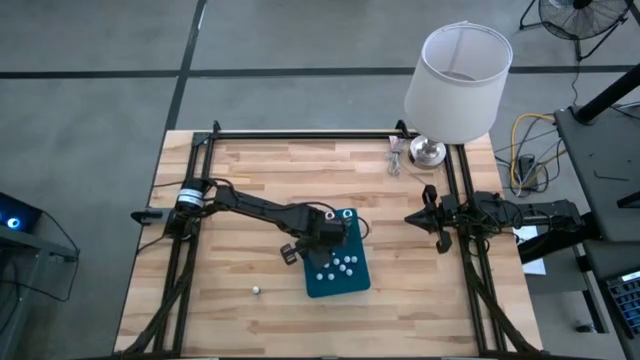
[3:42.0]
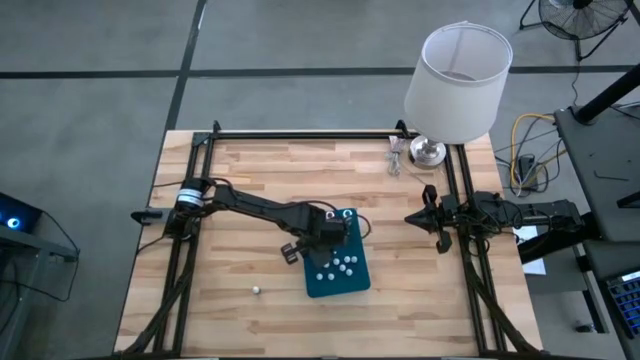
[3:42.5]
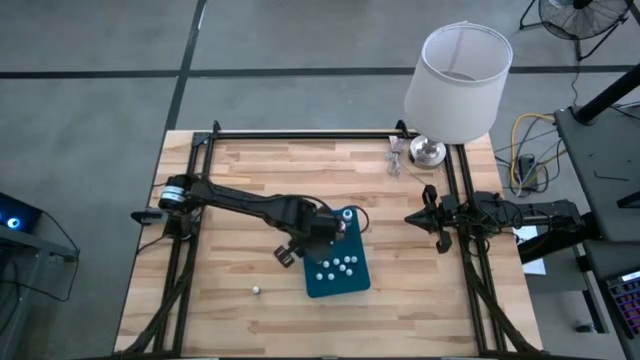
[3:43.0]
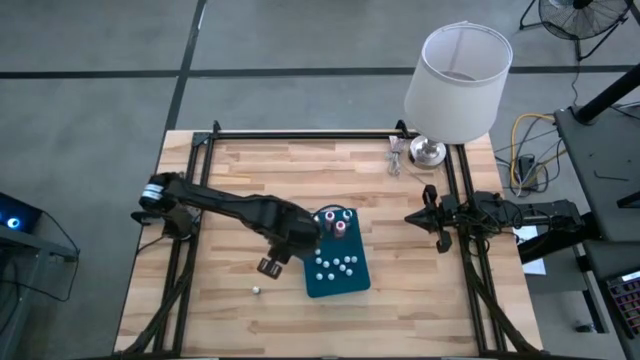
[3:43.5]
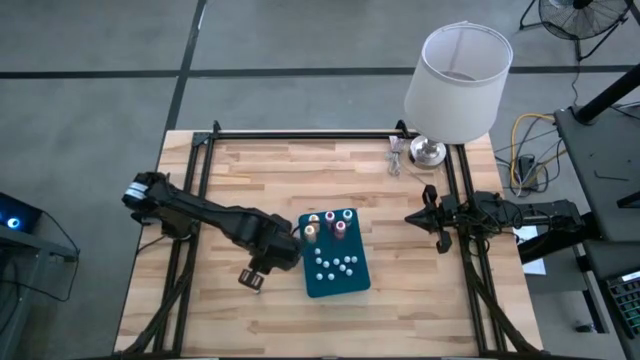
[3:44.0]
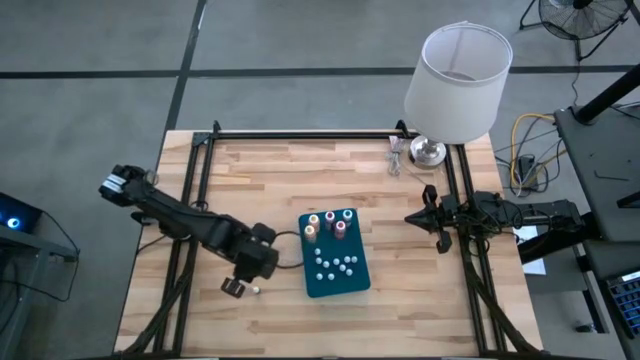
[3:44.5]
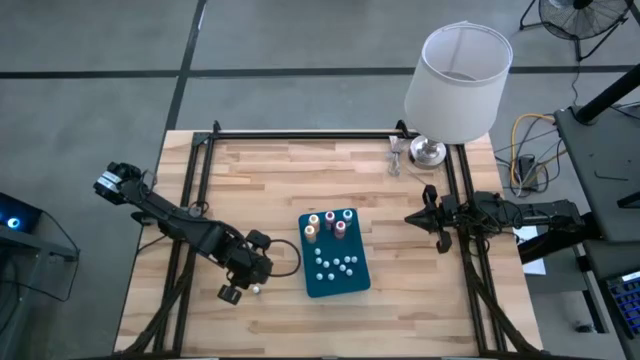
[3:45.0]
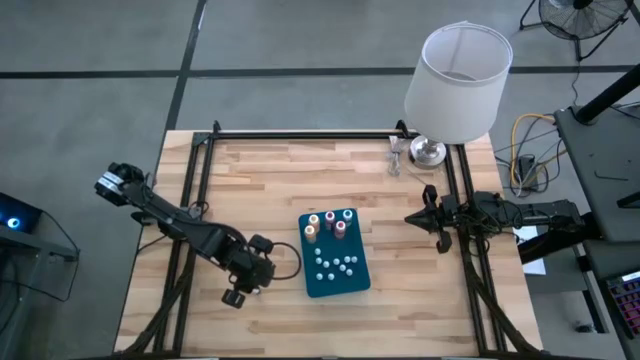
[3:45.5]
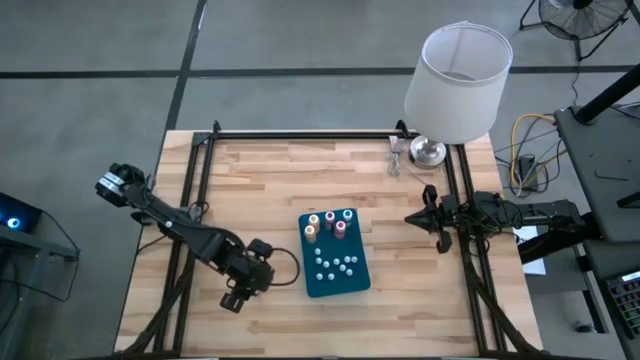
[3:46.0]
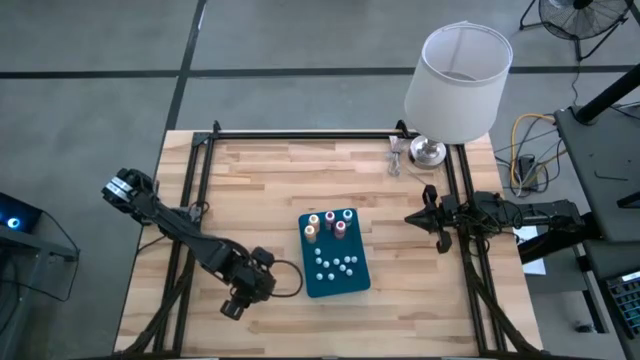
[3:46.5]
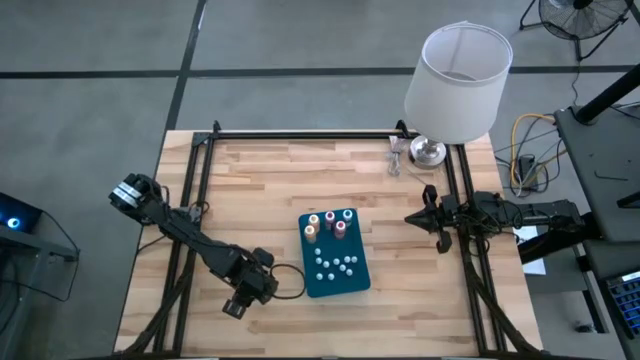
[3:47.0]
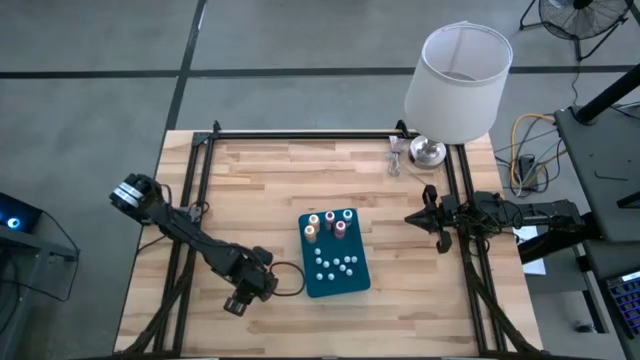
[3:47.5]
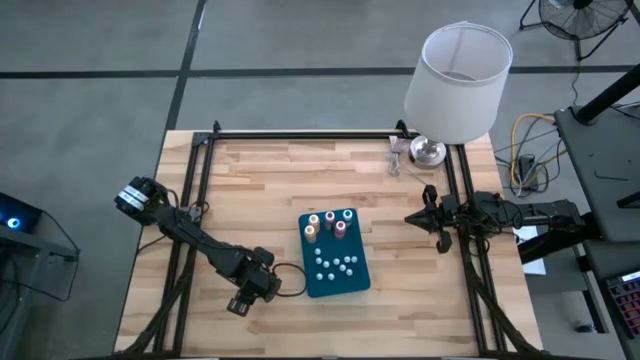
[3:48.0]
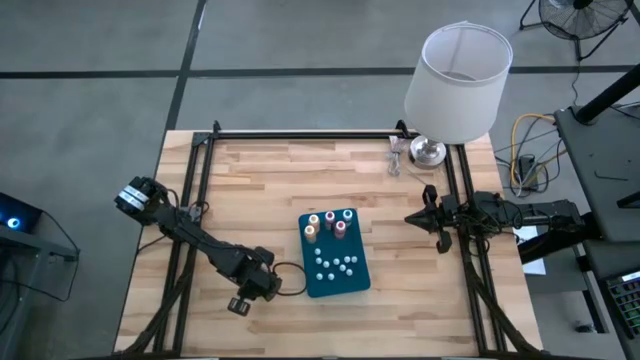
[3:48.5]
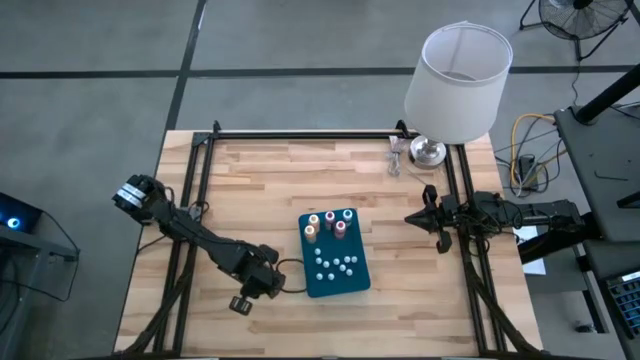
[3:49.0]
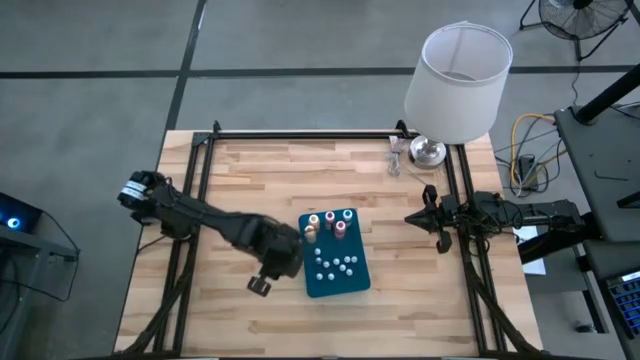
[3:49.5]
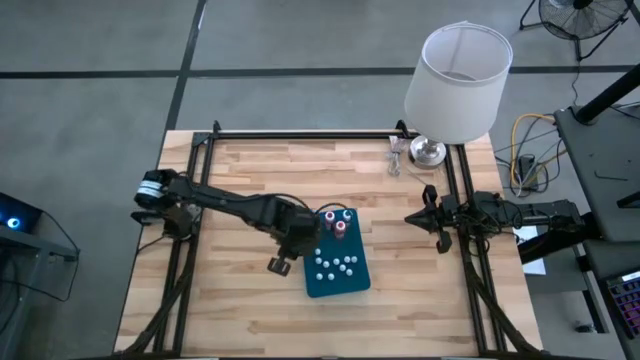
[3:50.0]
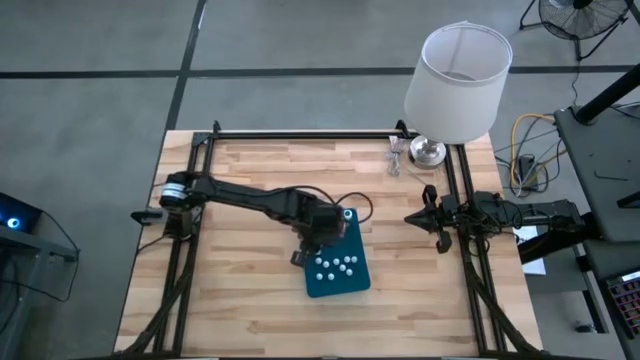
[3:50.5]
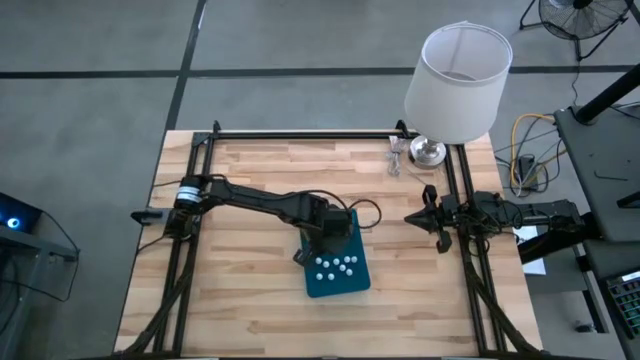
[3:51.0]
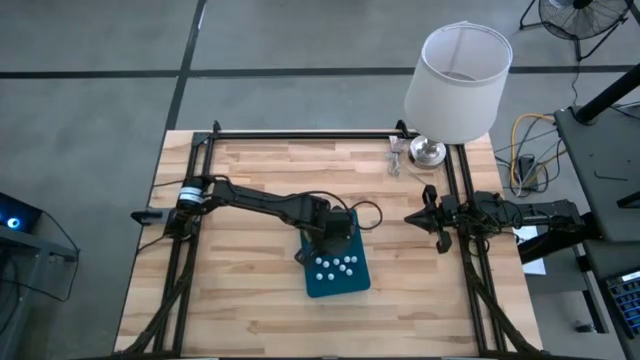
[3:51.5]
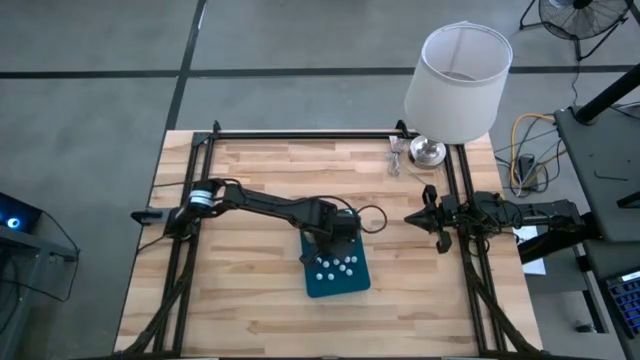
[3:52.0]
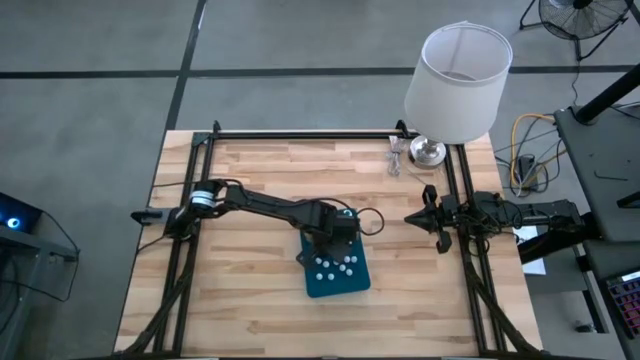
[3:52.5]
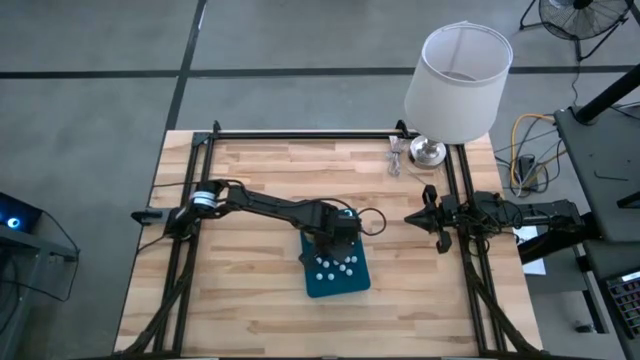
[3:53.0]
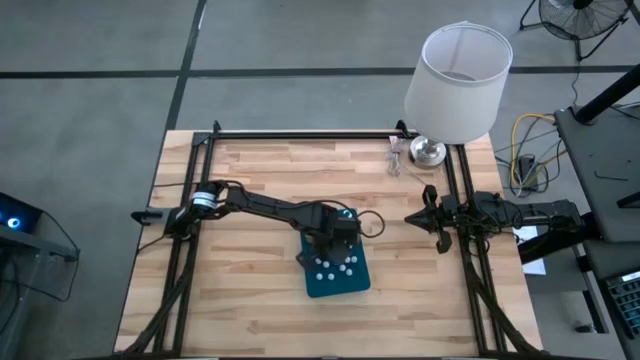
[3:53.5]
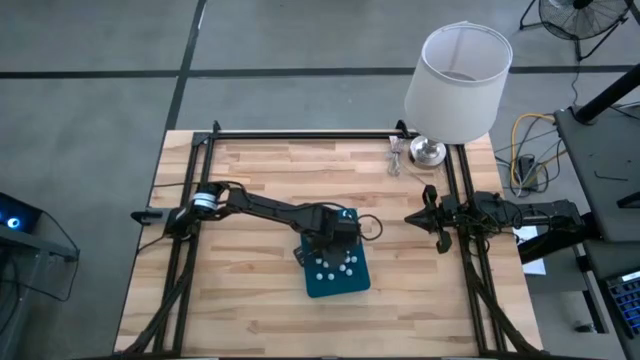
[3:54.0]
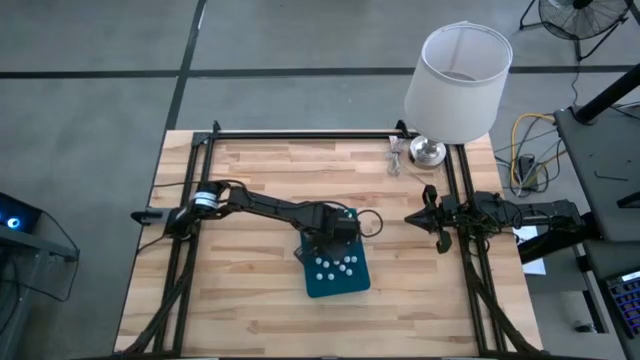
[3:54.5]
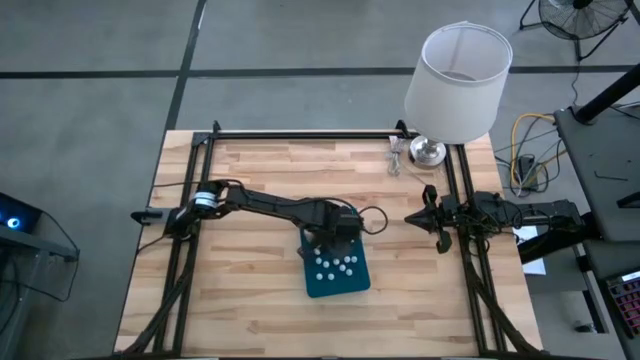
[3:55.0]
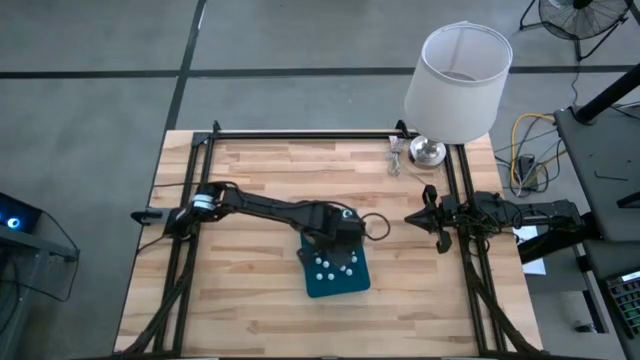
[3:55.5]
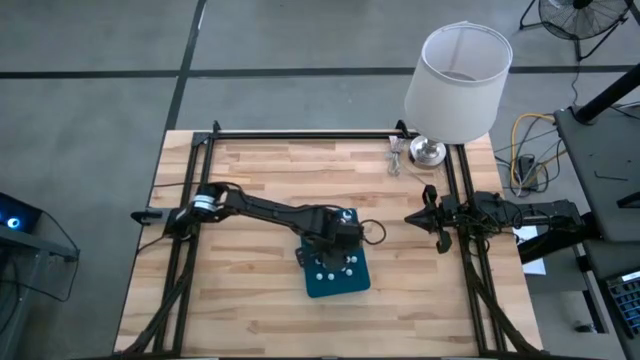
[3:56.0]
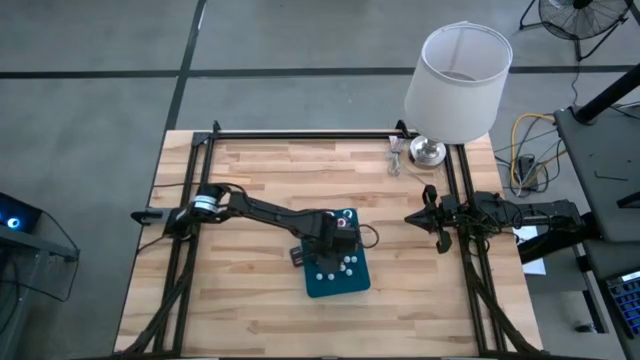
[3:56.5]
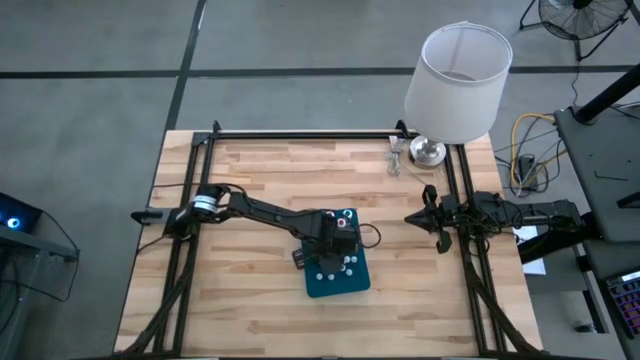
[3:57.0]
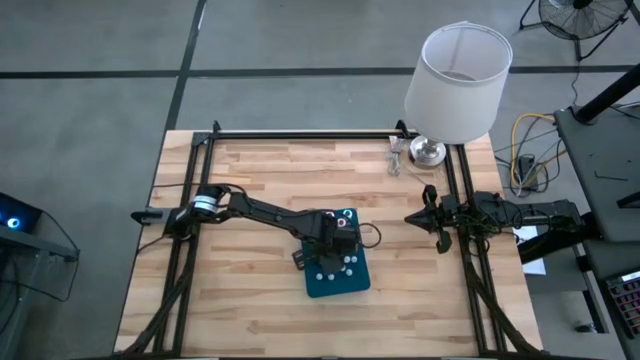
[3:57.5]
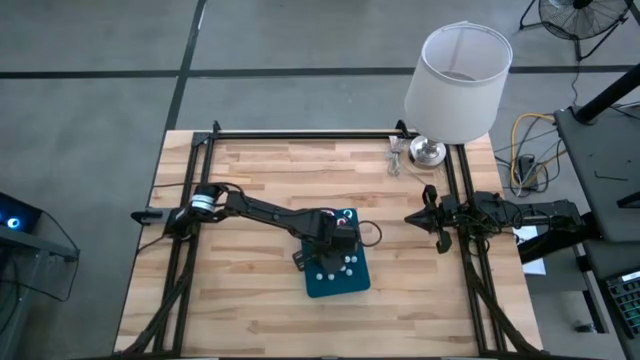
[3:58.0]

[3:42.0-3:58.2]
Task: Pick & Place food coloring
Put the small black food coloring bottle into the blue bin

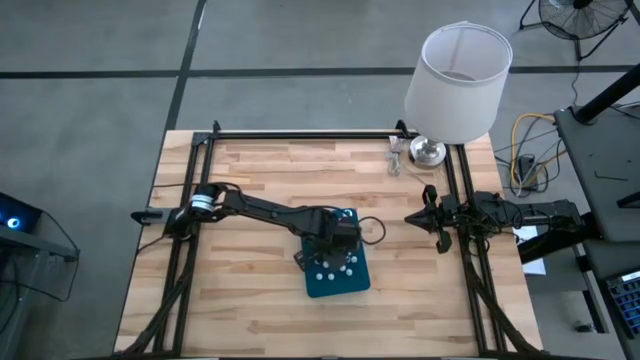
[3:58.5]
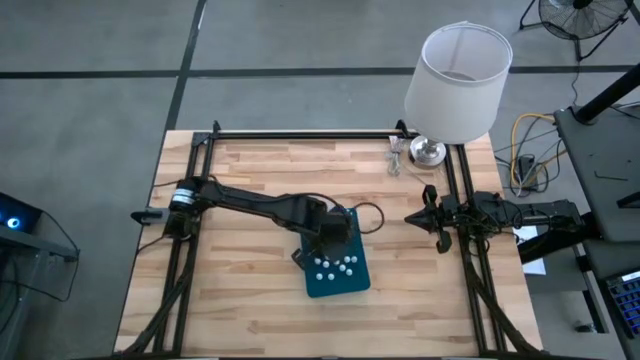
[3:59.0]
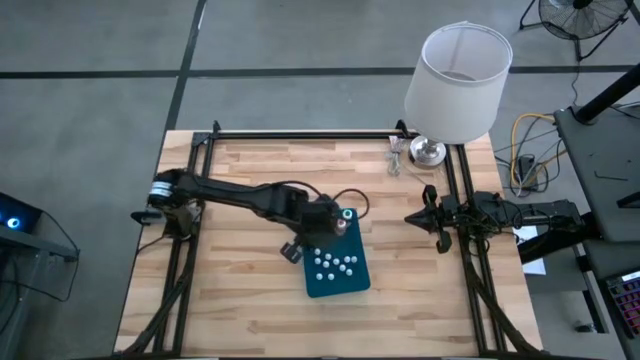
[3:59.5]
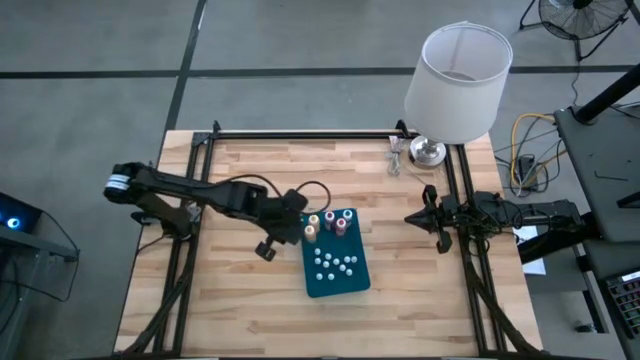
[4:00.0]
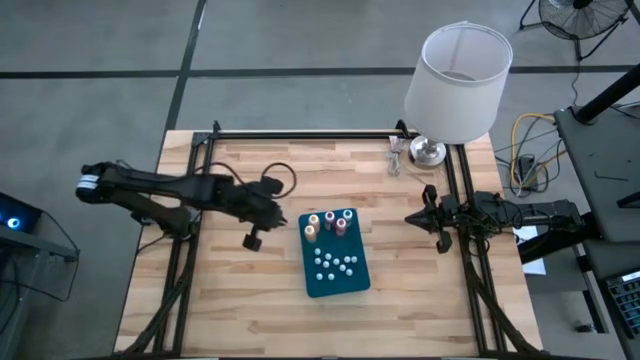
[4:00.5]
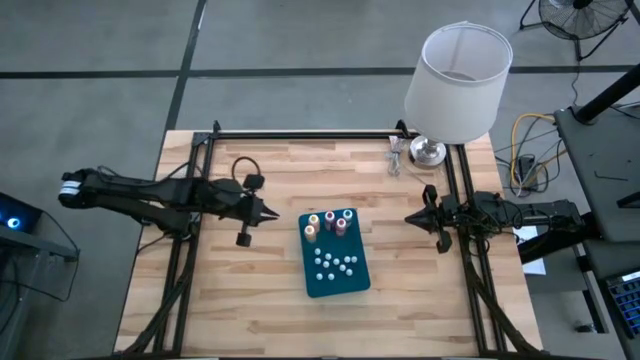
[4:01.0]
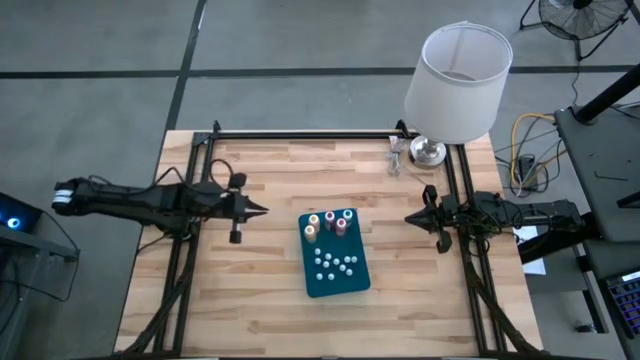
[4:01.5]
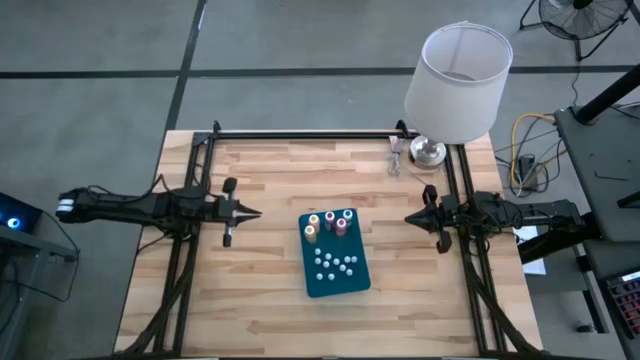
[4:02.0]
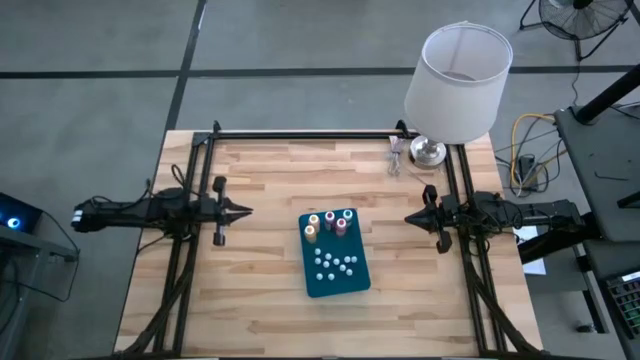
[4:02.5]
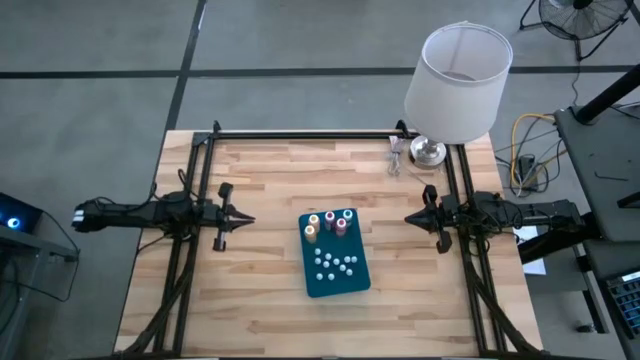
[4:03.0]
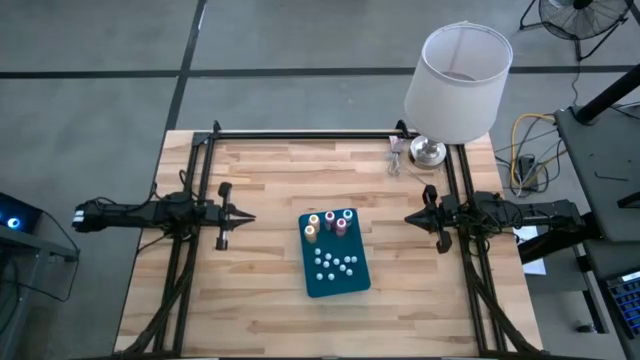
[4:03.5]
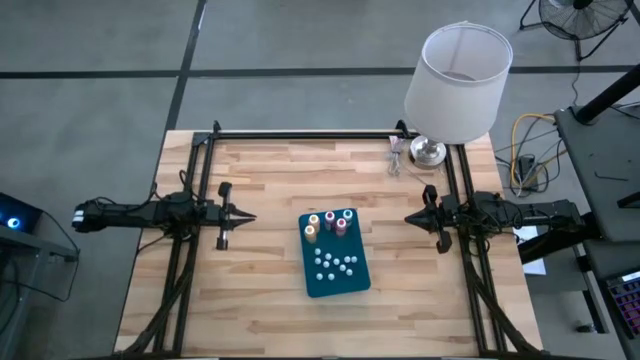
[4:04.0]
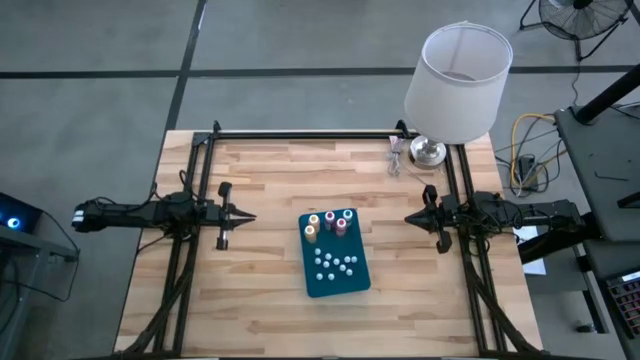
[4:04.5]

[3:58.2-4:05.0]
Return to Home Position
